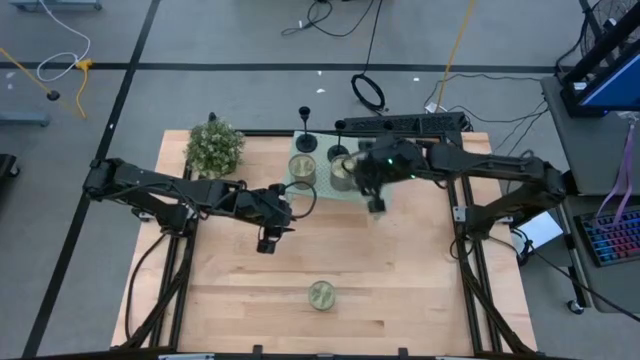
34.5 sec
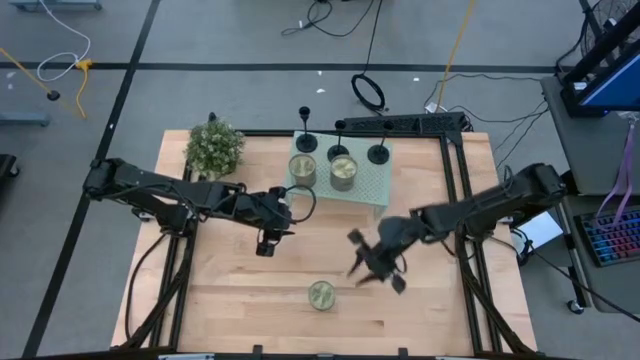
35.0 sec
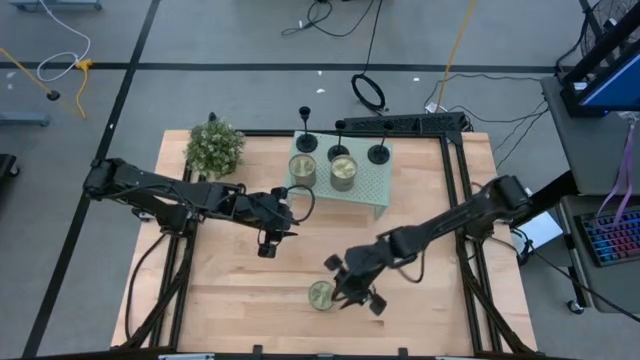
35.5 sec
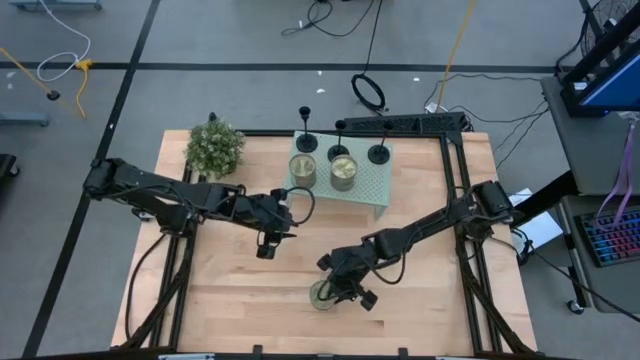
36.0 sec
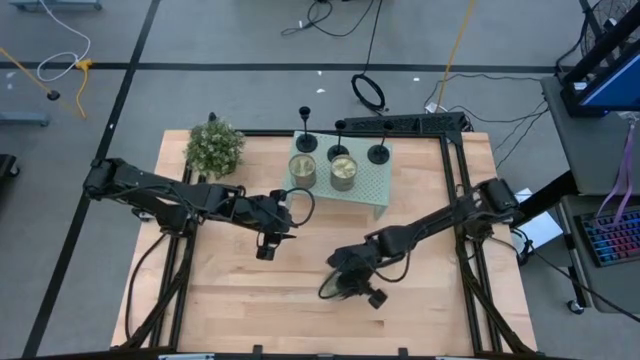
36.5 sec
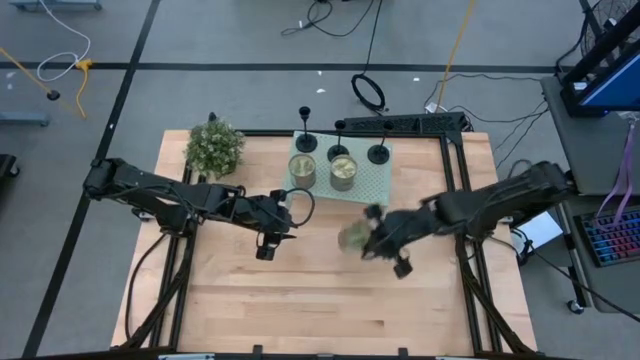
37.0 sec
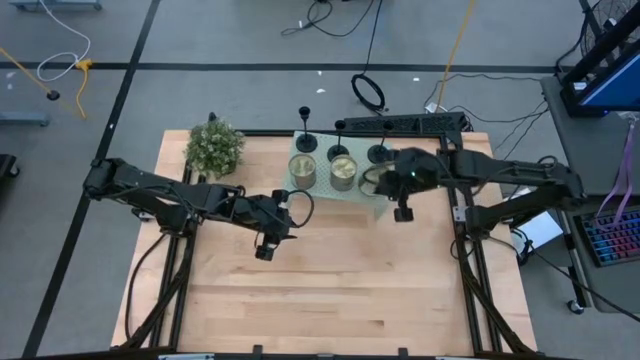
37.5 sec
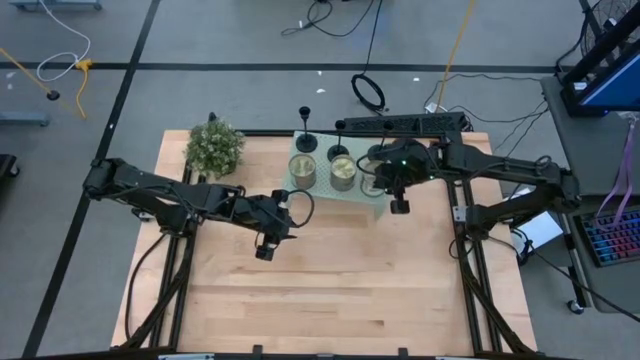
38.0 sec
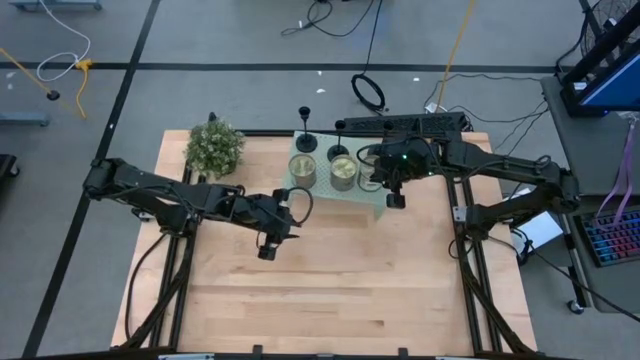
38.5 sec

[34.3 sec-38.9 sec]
Task: Pick & Place candle stick holders
Put the scented candle on the shelf

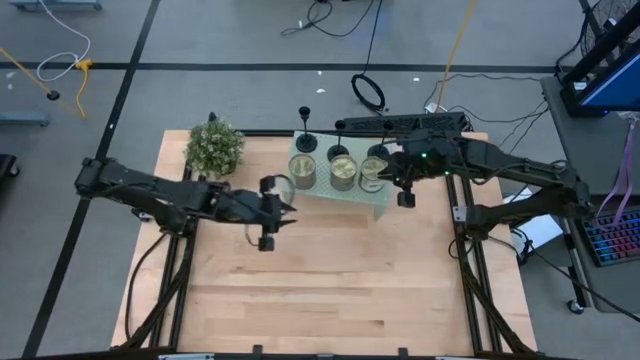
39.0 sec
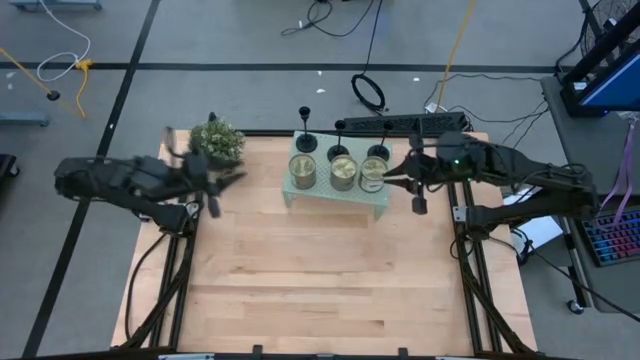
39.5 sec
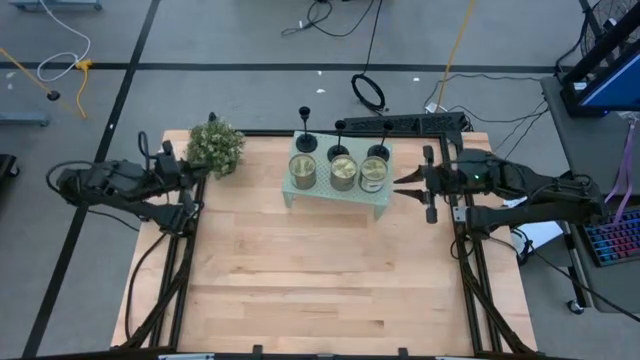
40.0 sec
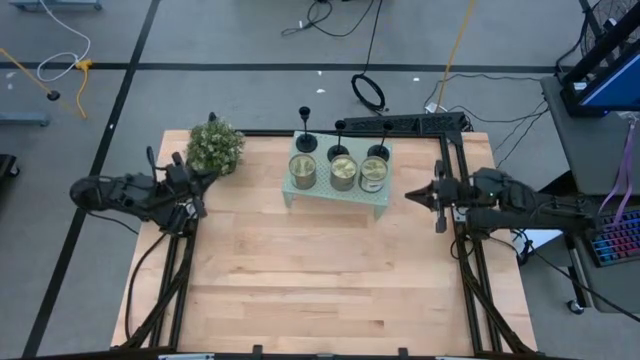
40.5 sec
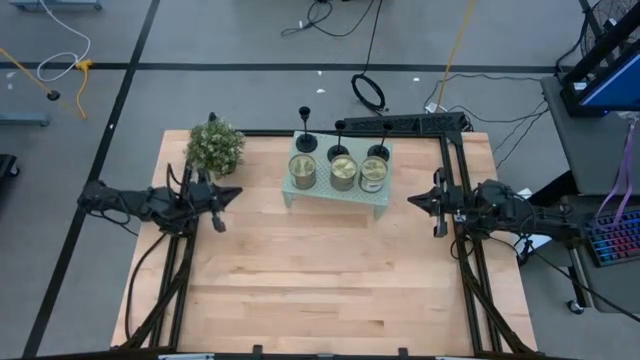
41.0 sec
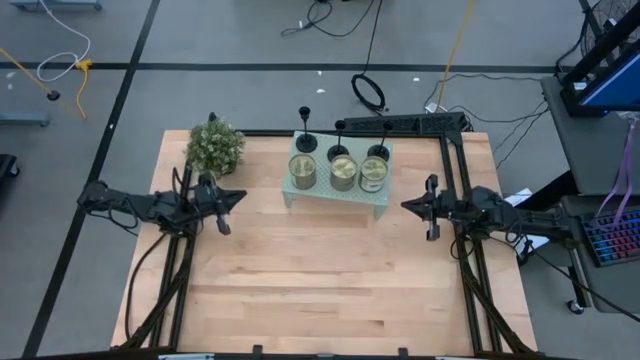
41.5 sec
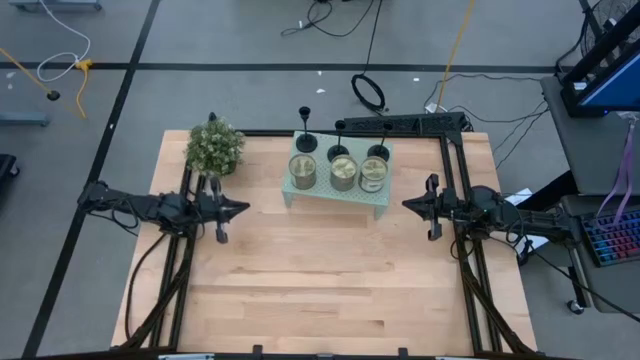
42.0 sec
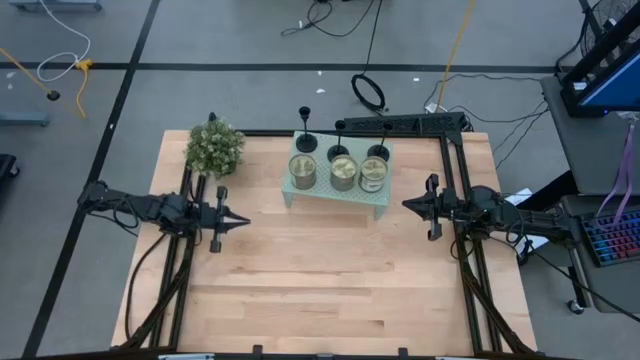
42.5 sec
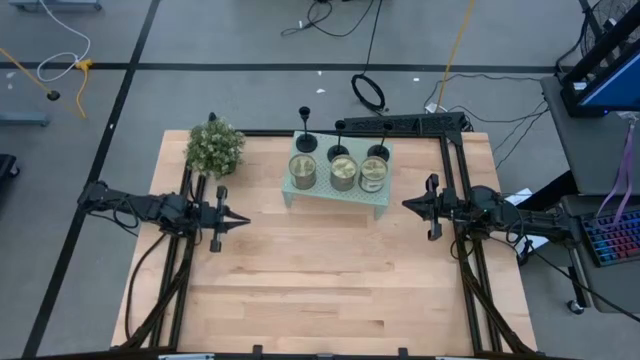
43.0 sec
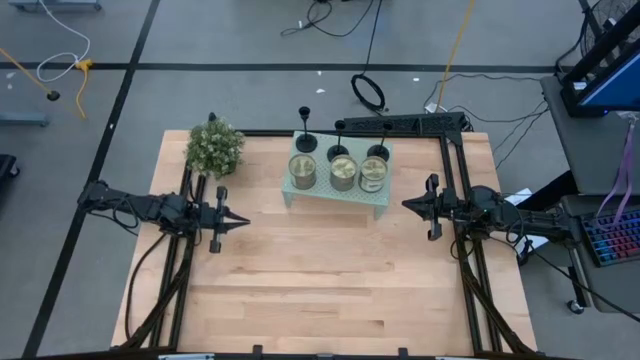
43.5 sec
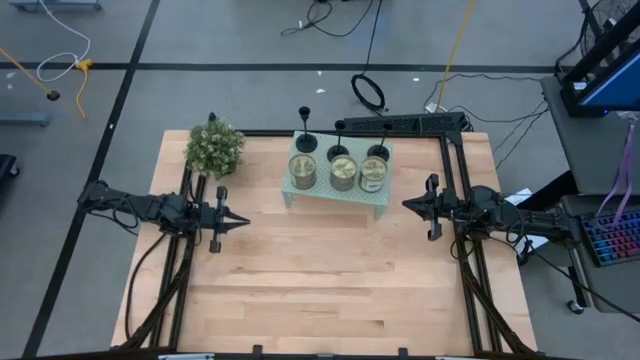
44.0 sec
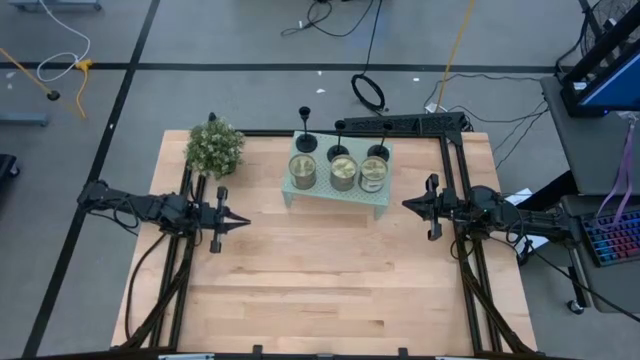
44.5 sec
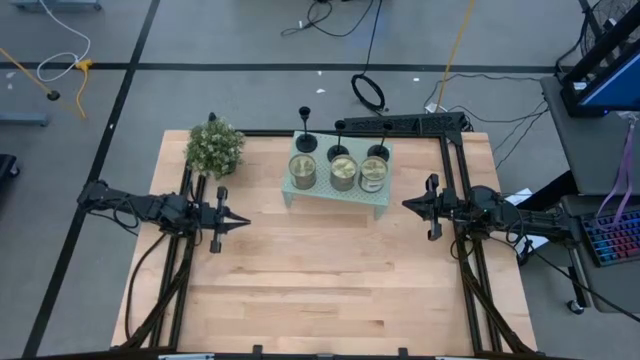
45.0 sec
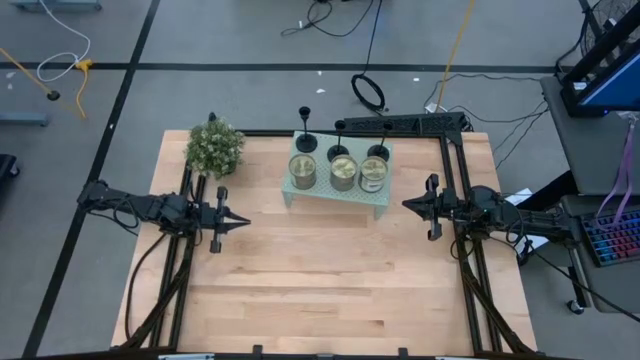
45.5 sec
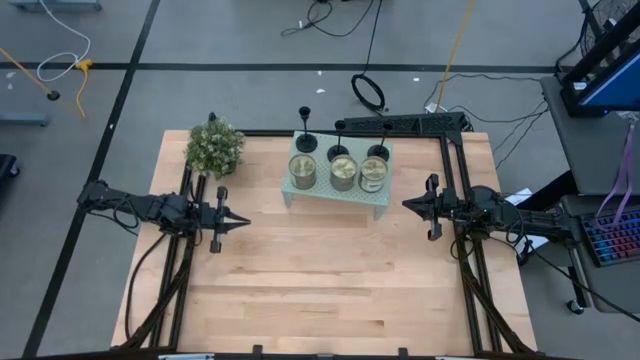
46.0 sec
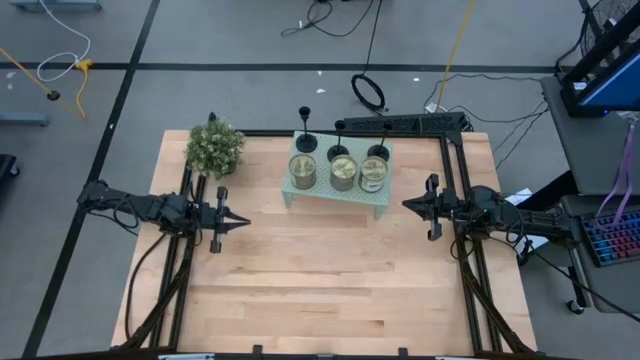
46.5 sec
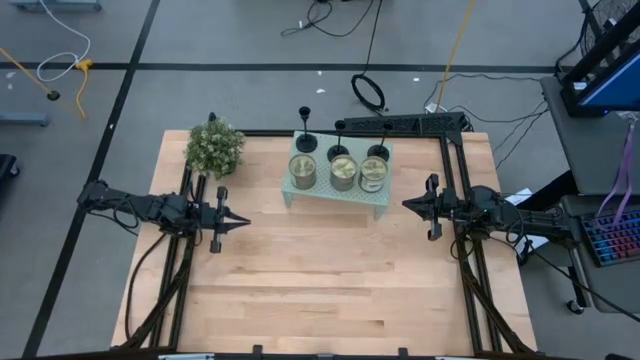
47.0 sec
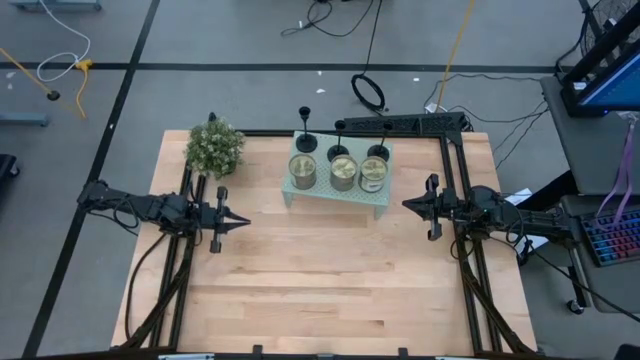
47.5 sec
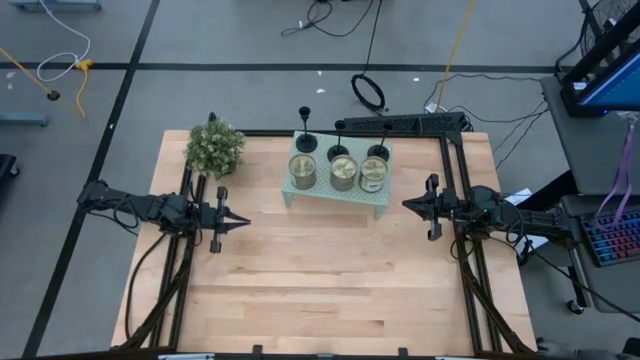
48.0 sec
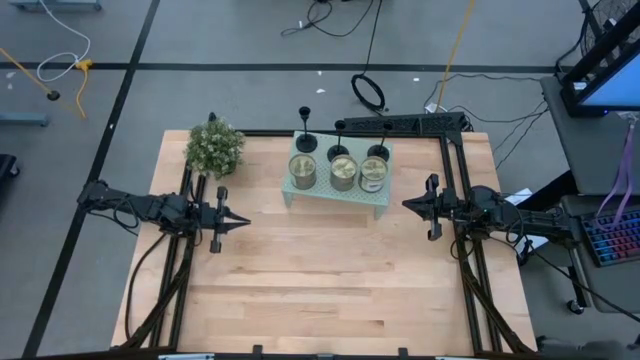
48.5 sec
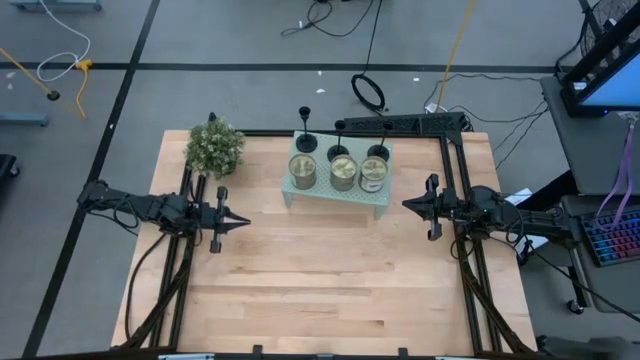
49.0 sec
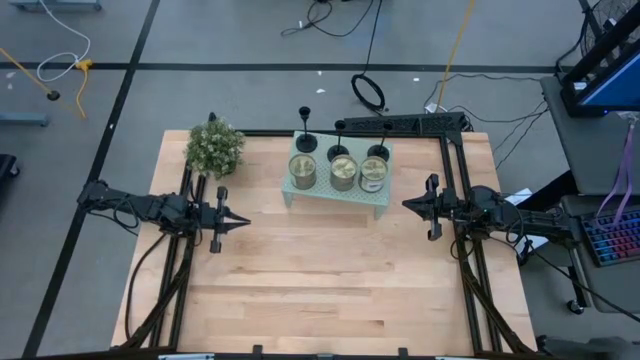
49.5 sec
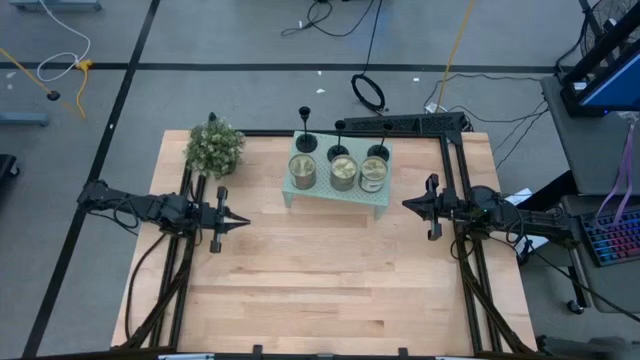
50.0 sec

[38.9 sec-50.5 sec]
Return to Home Position

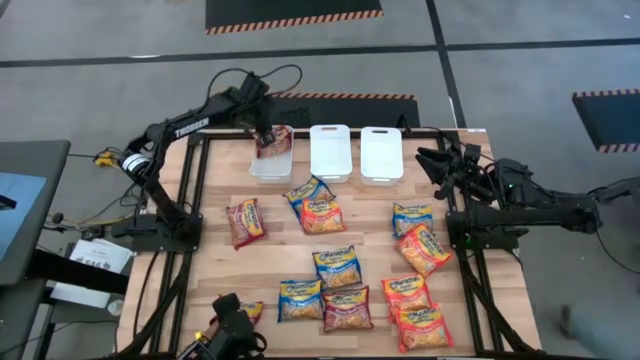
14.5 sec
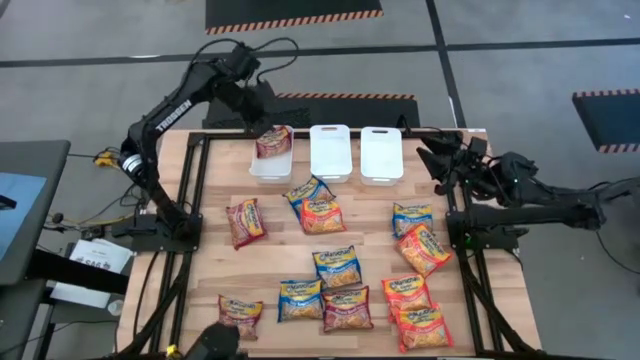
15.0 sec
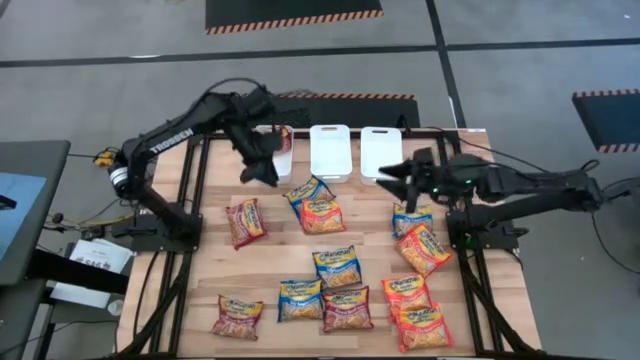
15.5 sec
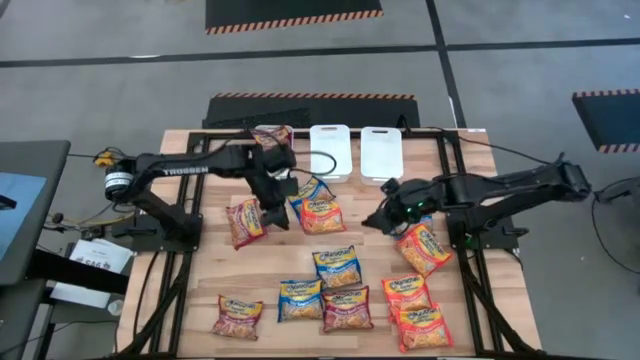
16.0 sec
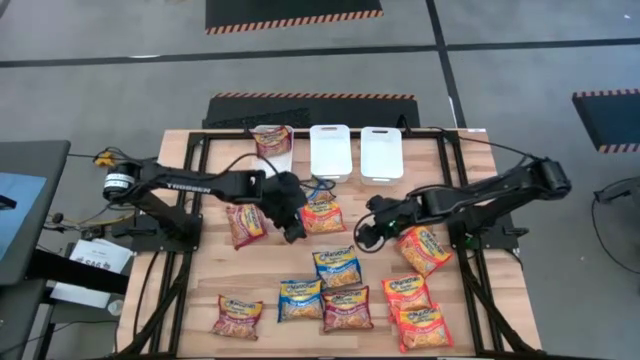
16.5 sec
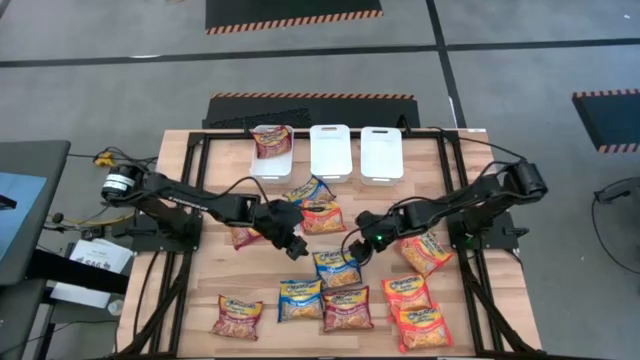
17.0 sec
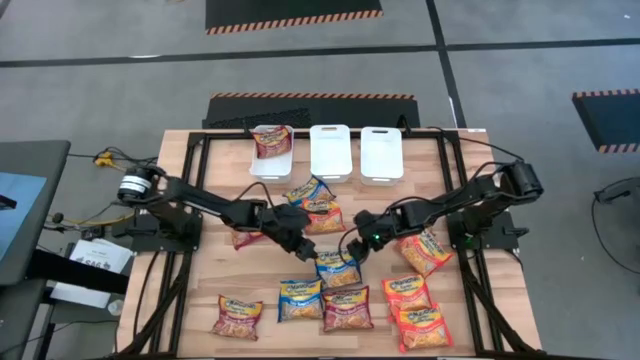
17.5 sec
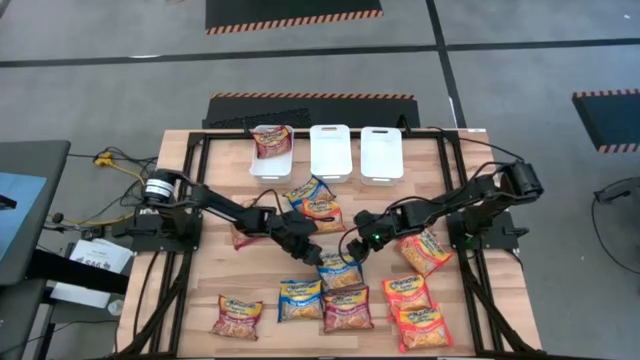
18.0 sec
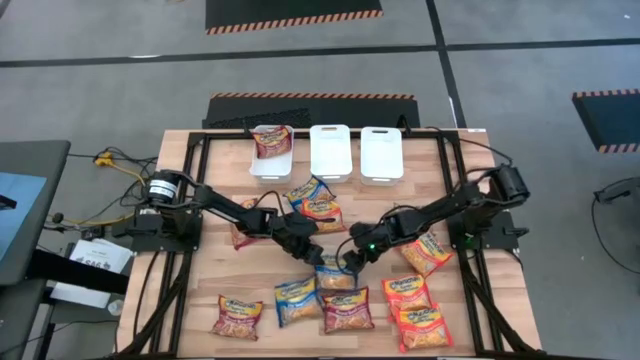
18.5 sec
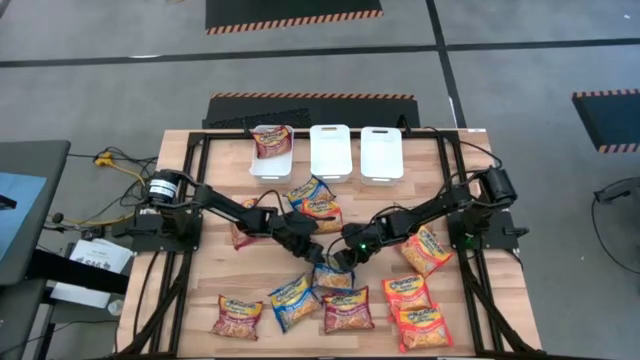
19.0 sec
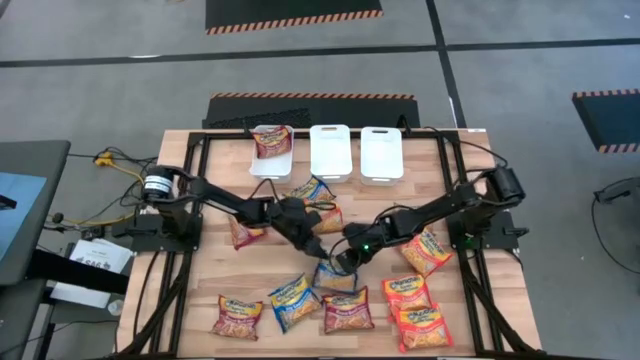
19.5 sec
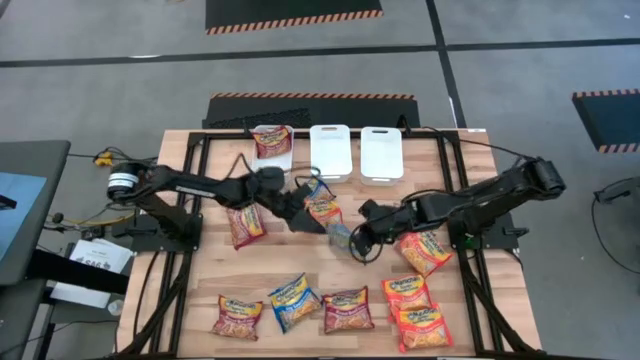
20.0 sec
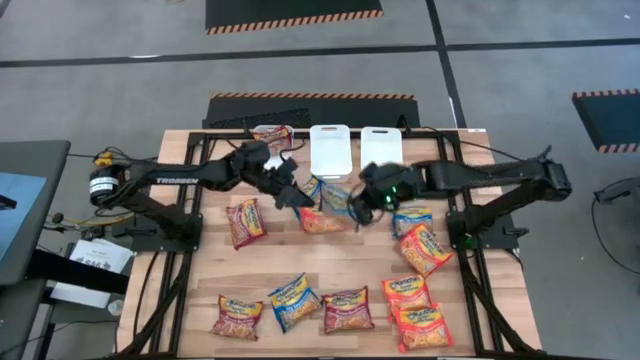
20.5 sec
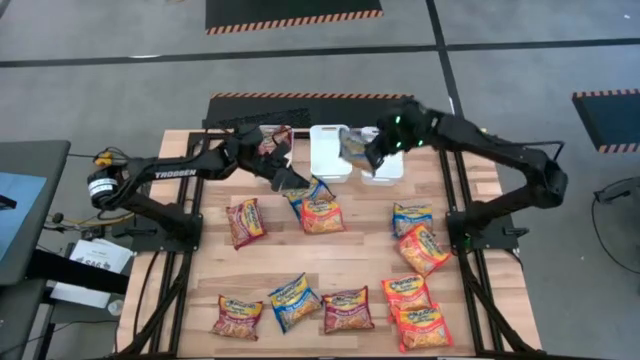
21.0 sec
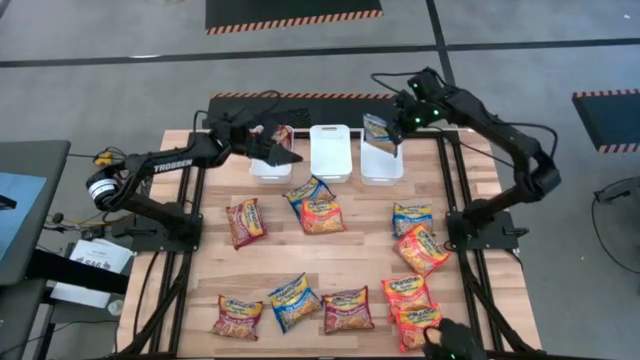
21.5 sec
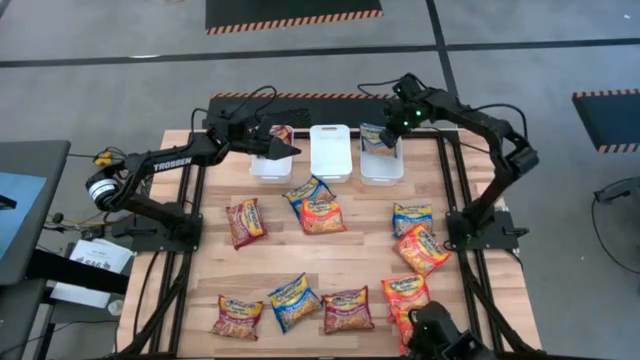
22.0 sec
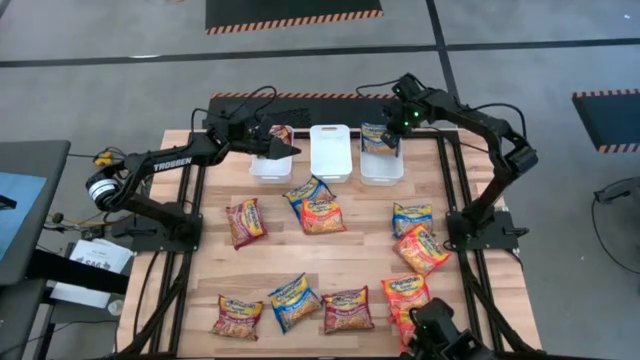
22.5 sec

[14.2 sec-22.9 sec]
Task: Sort Maruchan noodles
Put the blue noodle pack into the right white bin
